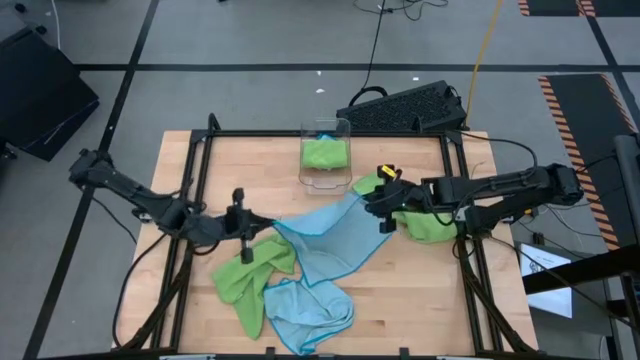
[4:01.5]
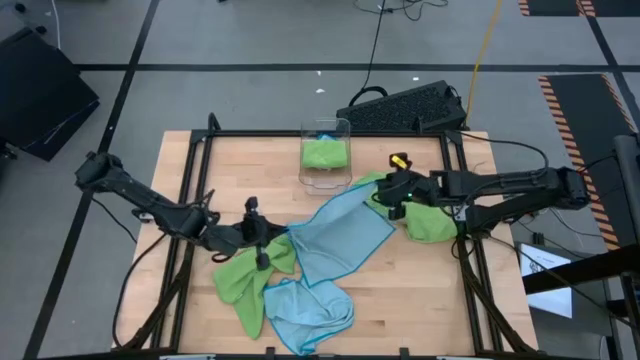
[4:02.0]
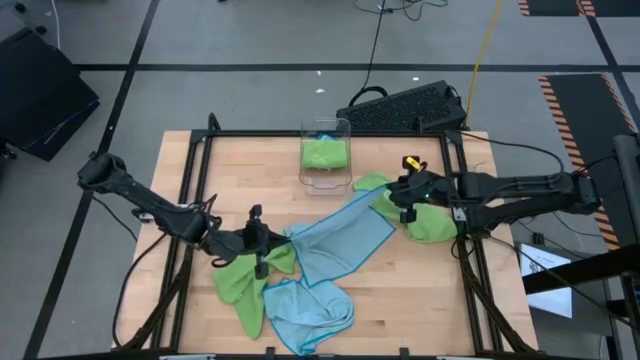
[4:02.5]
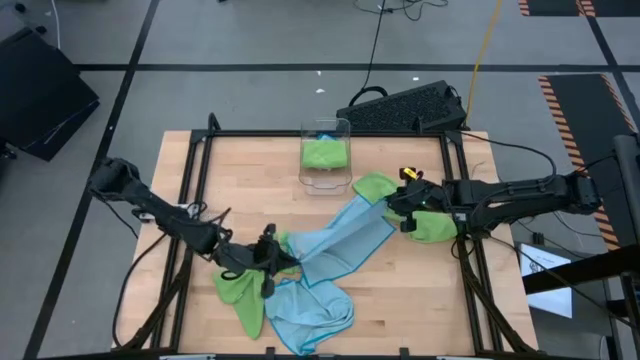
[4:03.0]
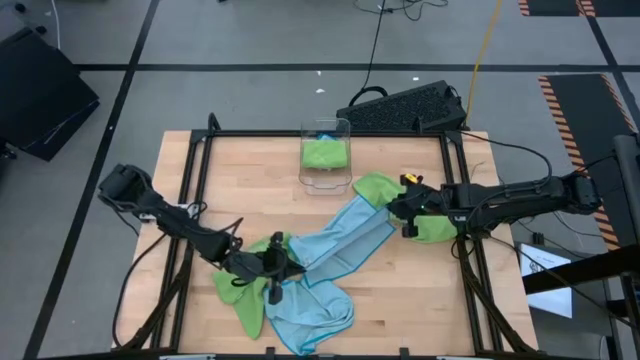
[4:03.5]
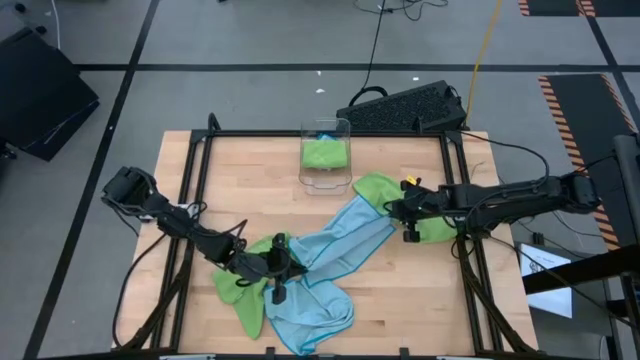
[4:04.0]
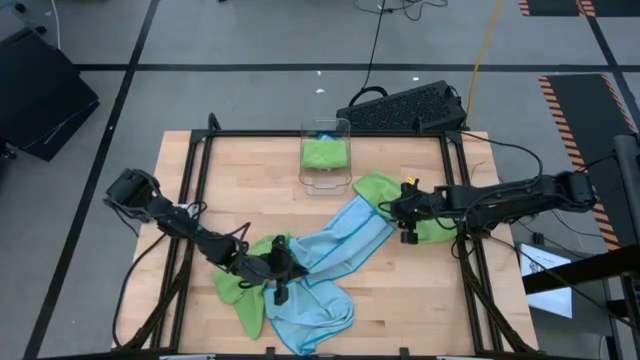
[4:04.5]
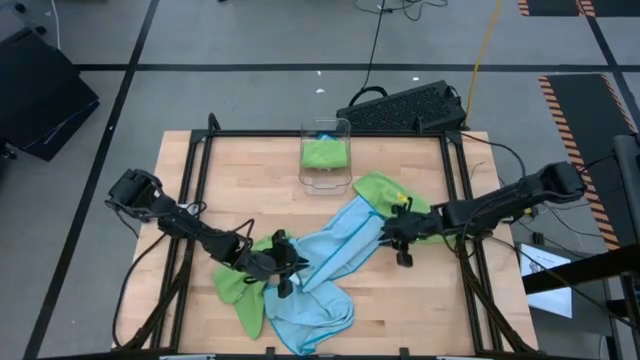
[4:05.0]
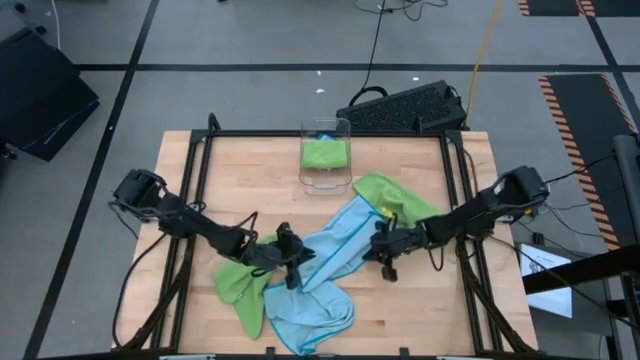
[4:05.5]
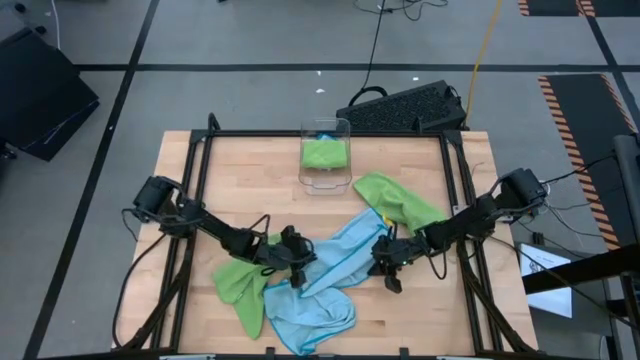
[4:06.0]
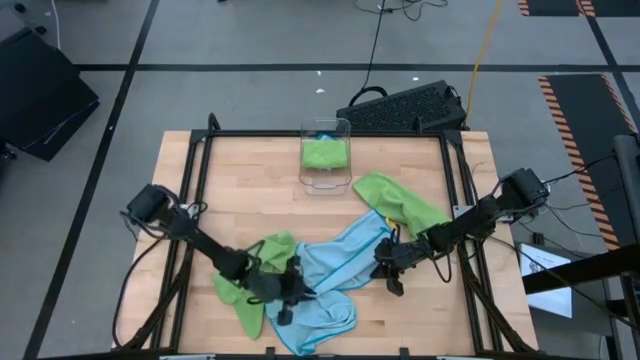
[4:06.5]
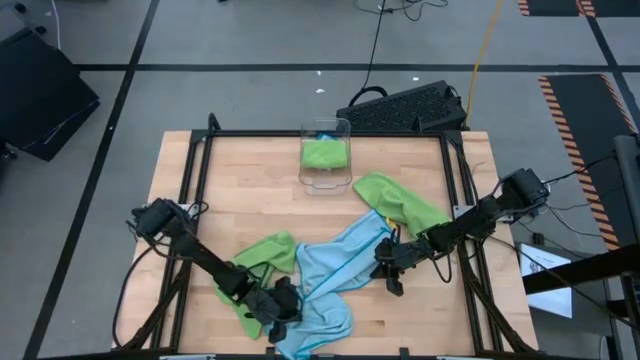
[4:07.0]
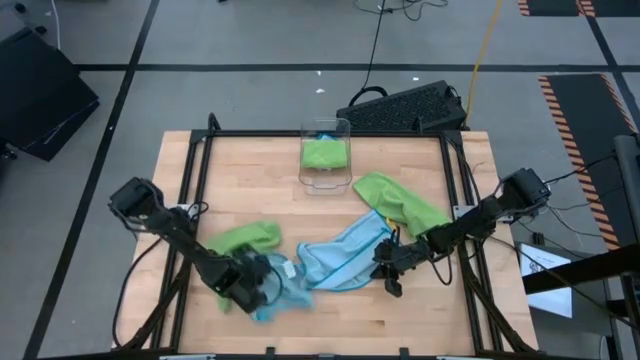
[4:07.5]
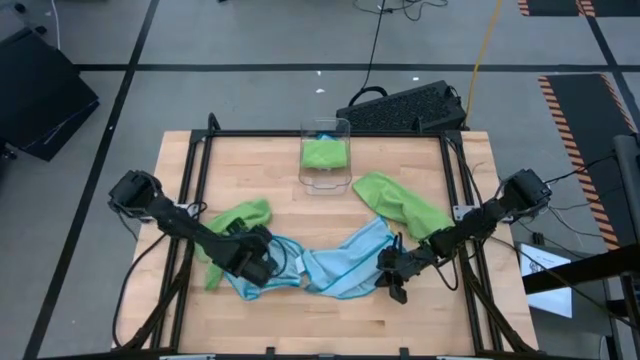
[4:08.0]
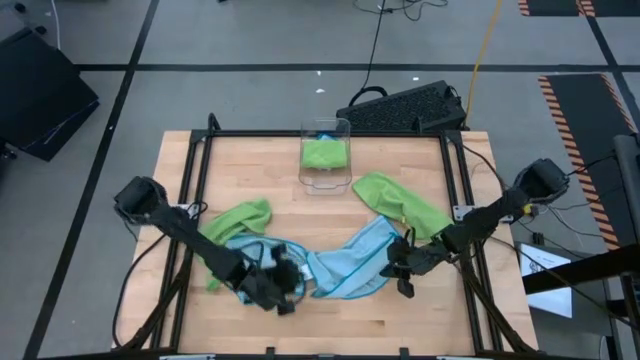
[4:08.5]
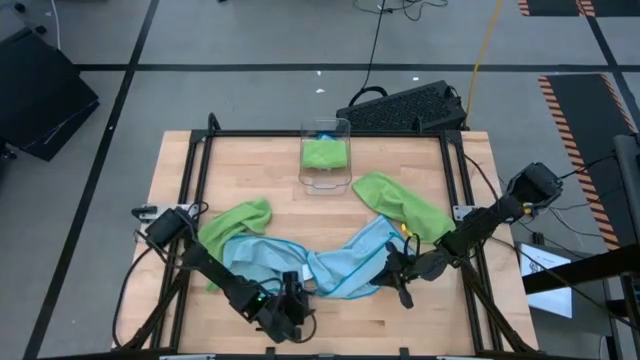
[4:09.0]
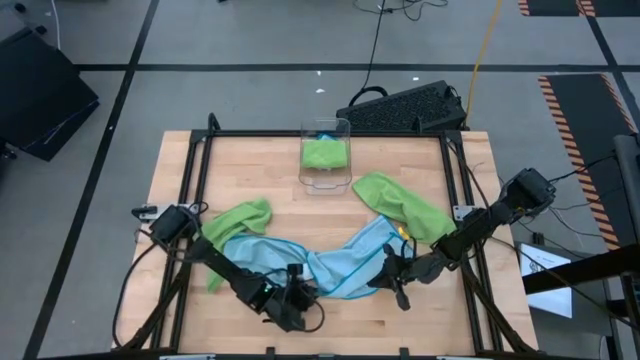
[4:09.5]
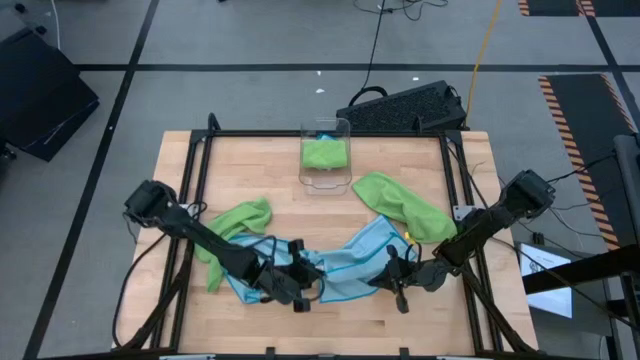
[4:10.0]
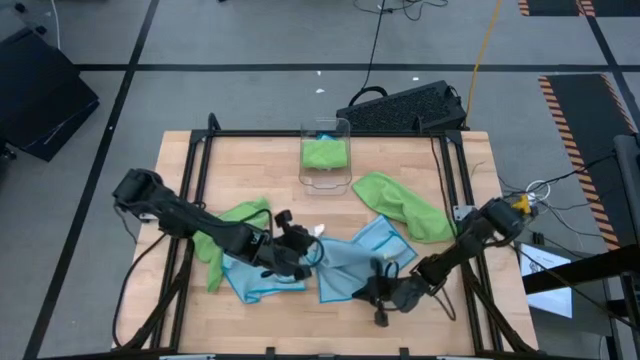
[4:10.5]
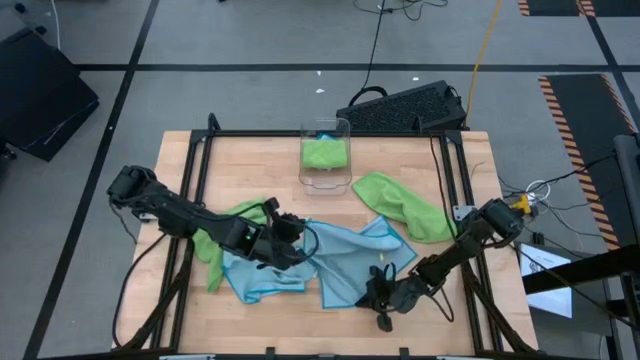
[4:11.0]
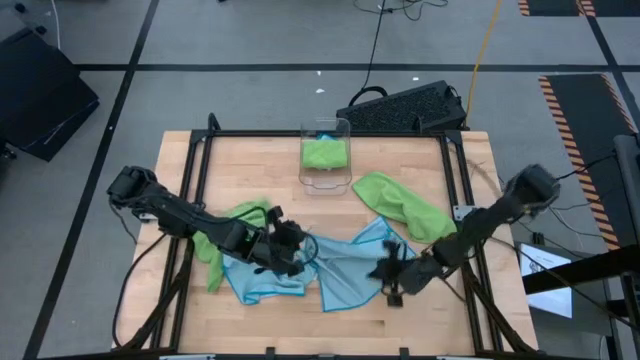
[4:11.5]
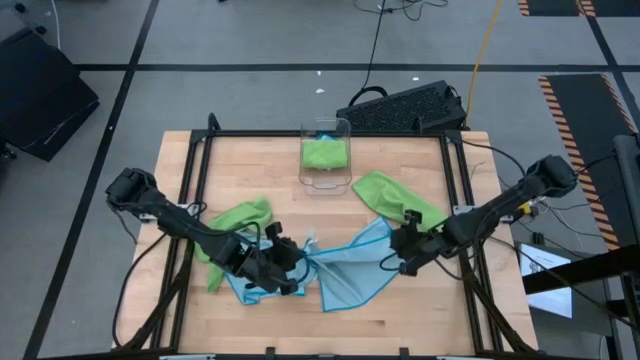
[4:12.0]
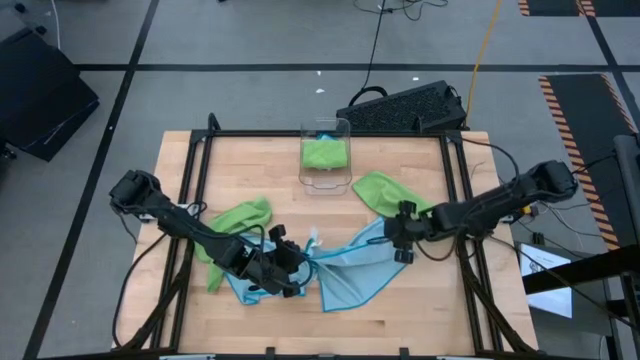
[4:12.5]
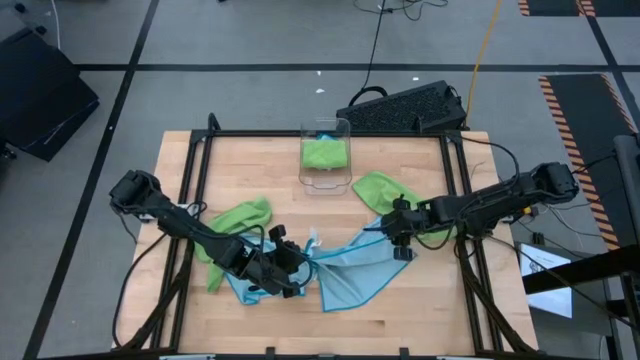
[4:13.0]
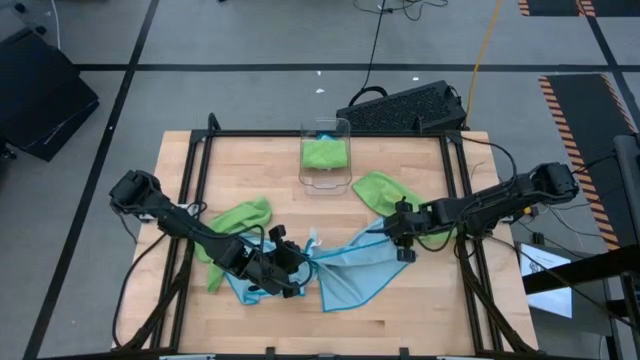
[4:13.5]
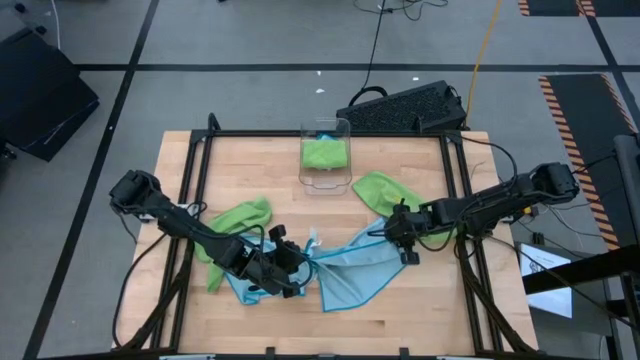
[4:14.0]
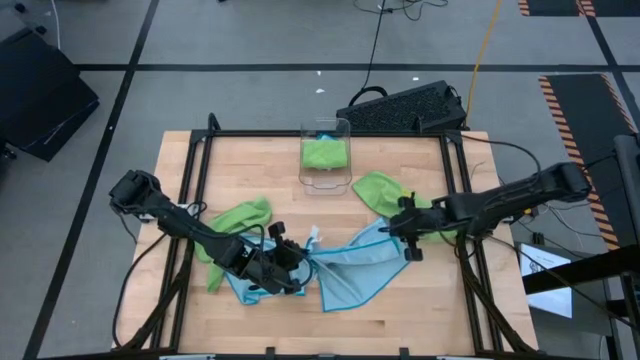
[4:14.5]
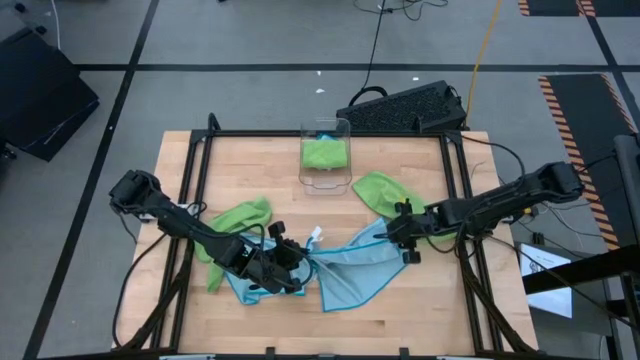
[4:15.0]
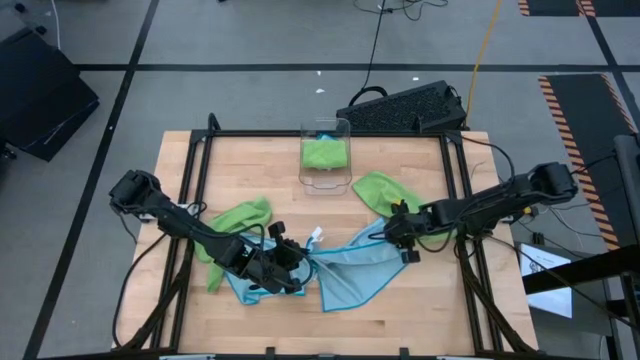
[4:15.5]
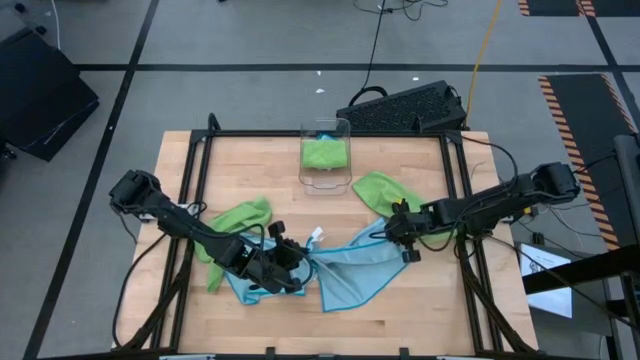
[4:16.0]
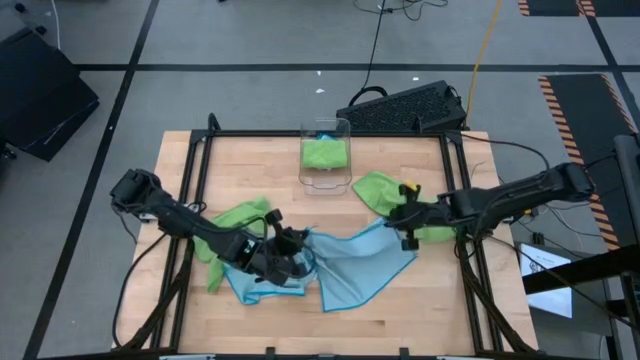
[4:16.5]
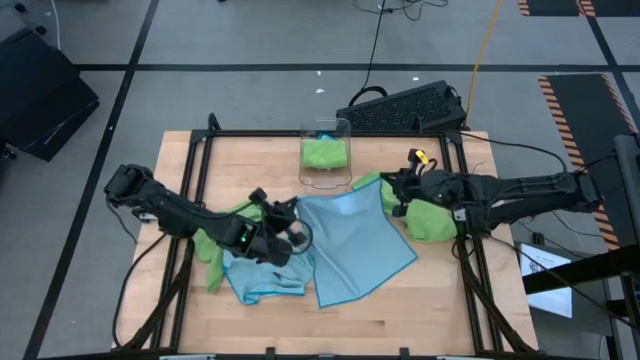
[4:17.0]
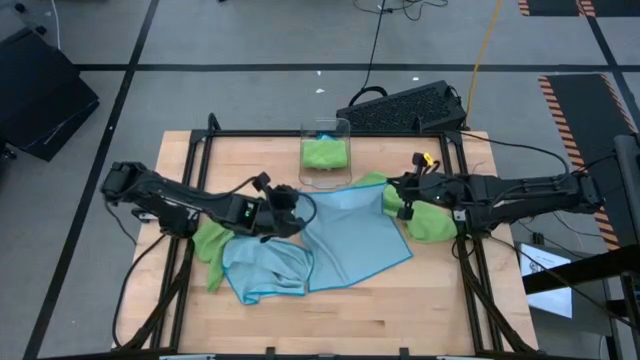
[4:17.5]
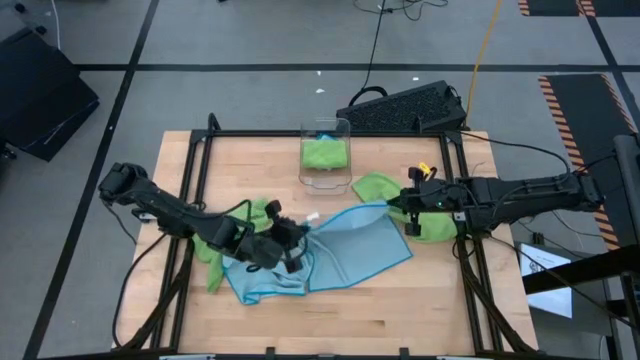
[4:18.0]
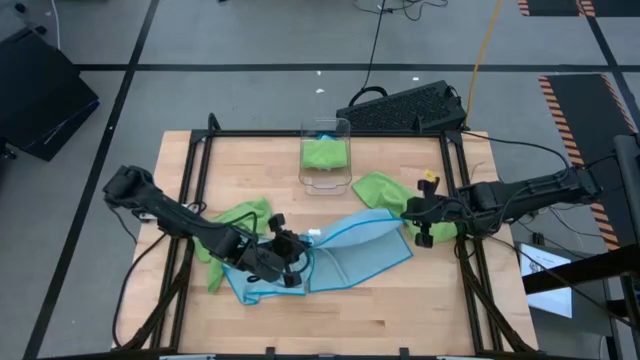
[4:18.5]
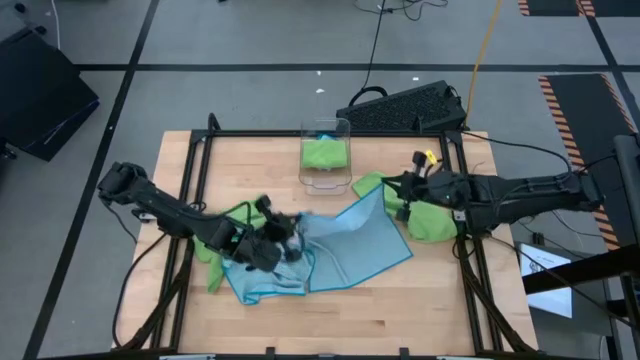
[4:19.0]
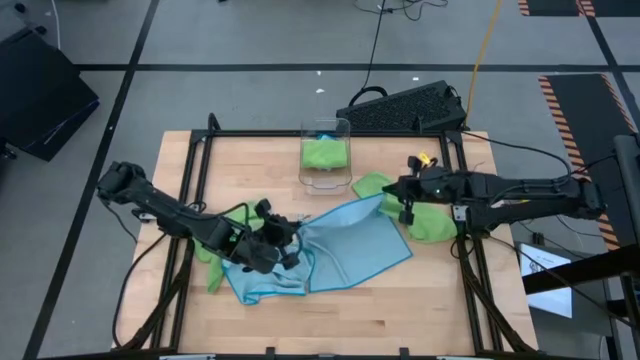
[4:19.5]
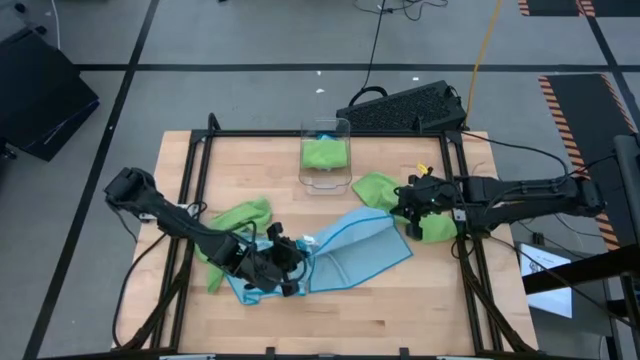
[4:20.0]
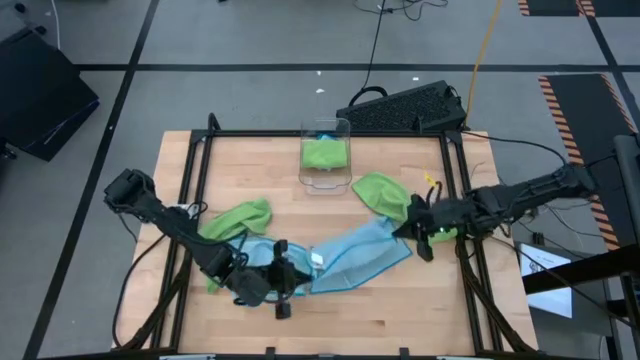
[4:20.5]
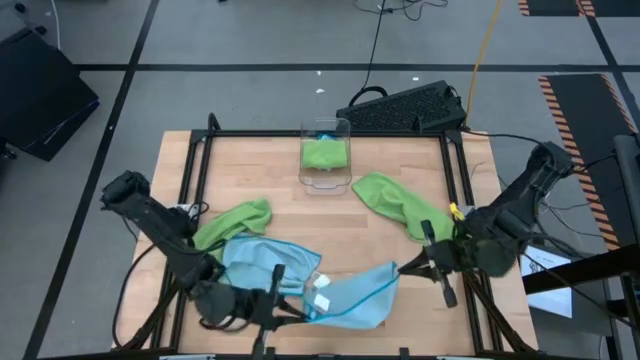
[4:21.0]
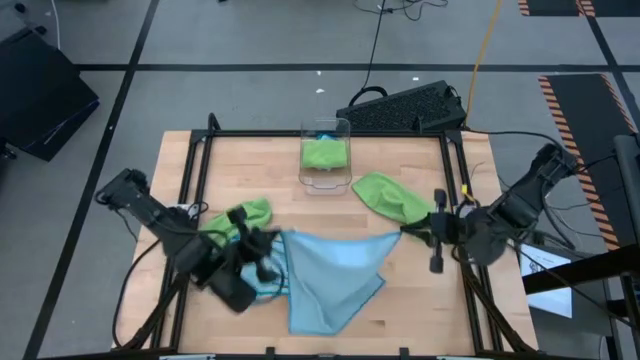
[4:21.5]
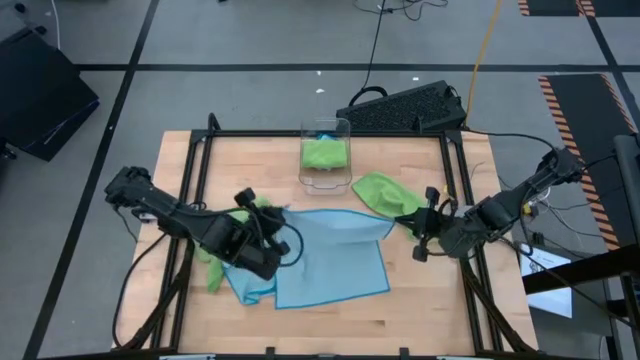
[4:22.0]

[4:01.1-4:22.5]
Task: Fold microfiber towels
Fold the right blue towel
